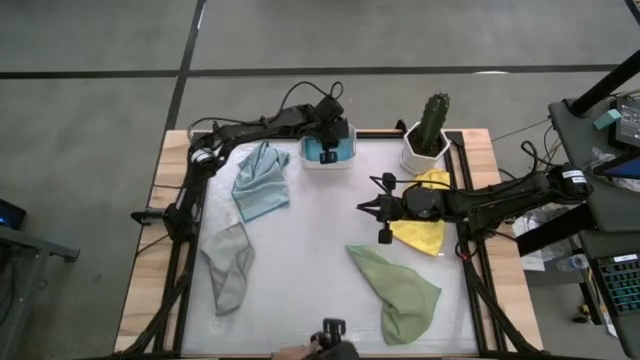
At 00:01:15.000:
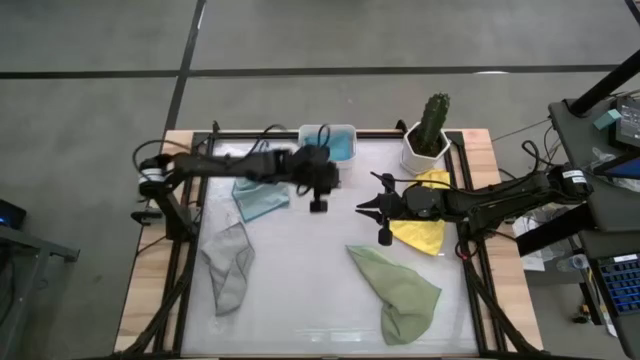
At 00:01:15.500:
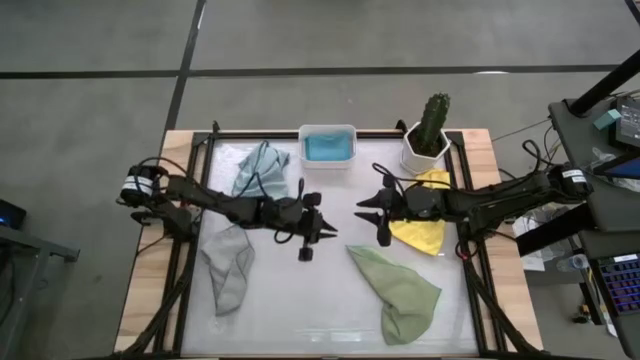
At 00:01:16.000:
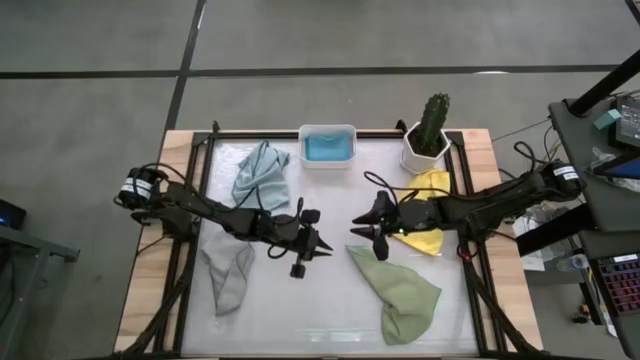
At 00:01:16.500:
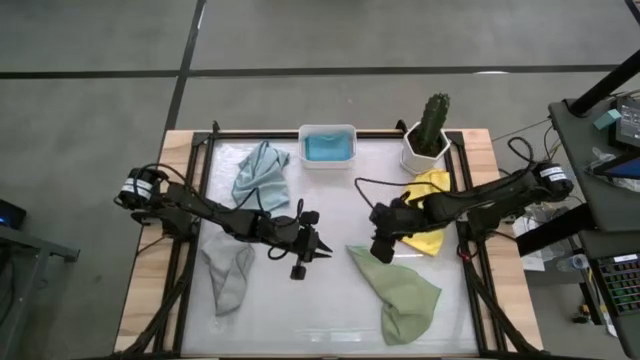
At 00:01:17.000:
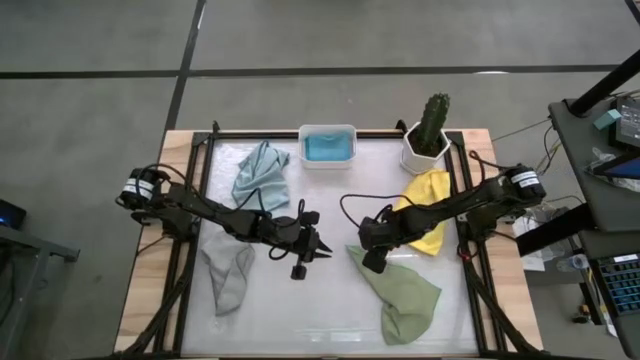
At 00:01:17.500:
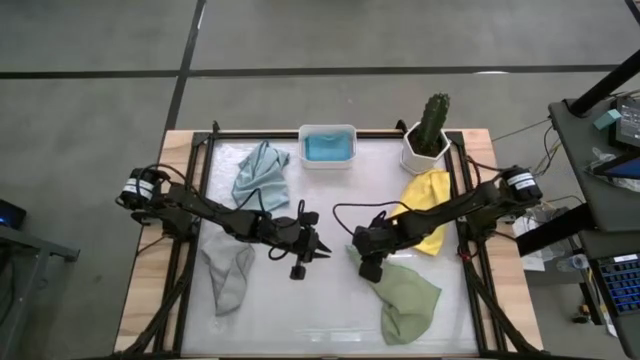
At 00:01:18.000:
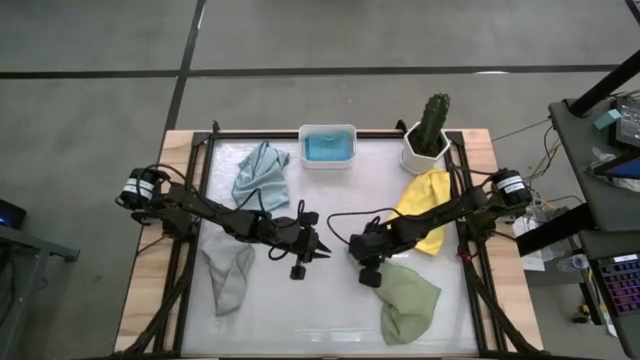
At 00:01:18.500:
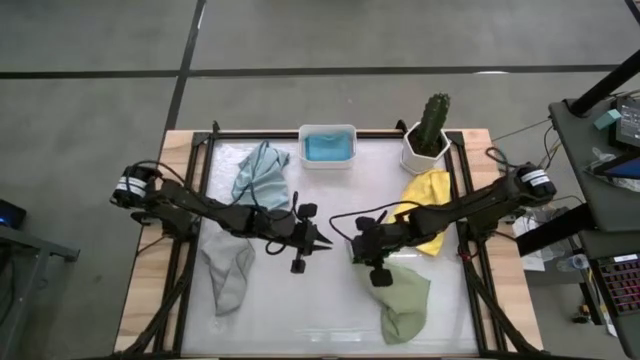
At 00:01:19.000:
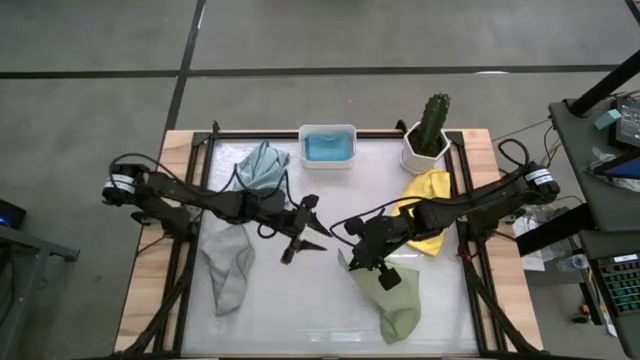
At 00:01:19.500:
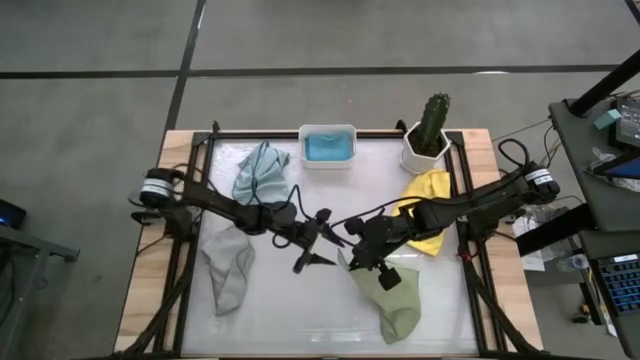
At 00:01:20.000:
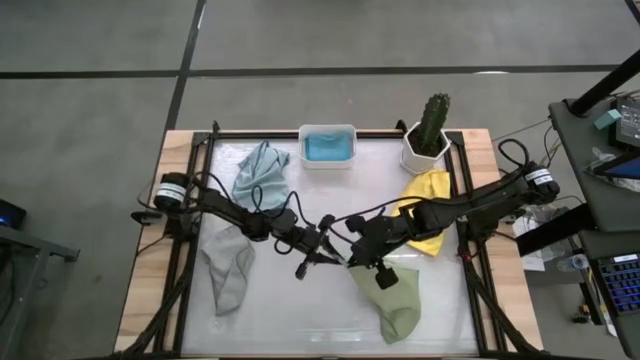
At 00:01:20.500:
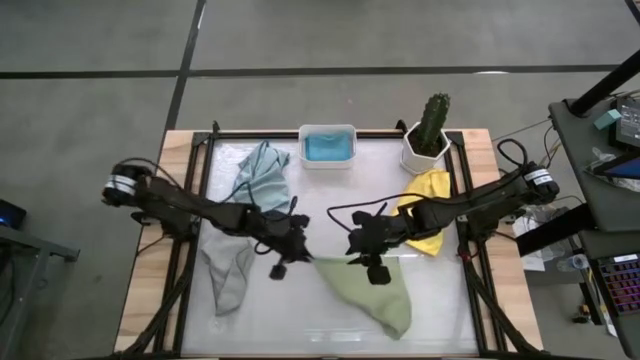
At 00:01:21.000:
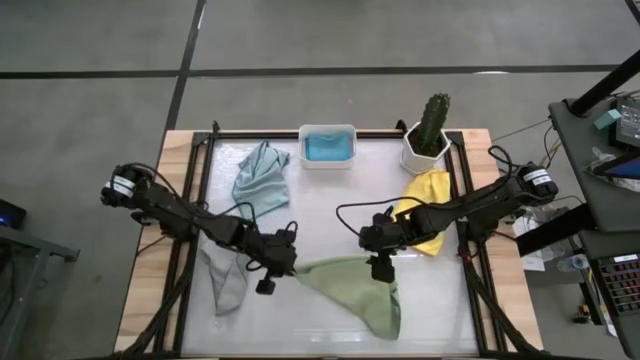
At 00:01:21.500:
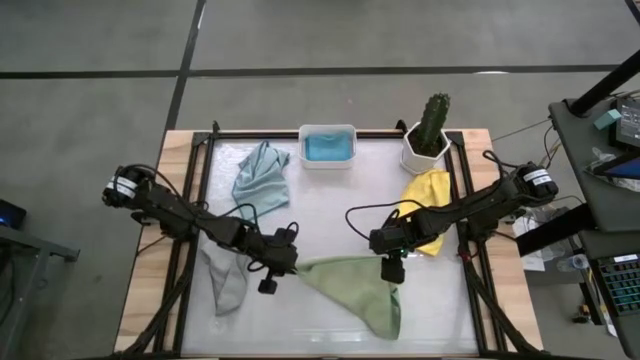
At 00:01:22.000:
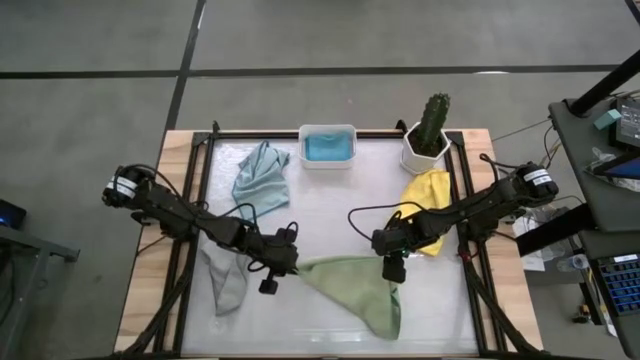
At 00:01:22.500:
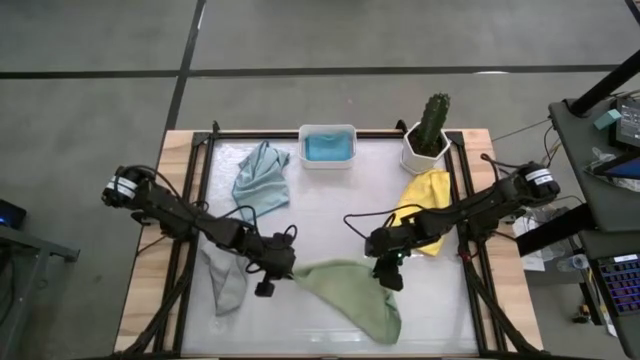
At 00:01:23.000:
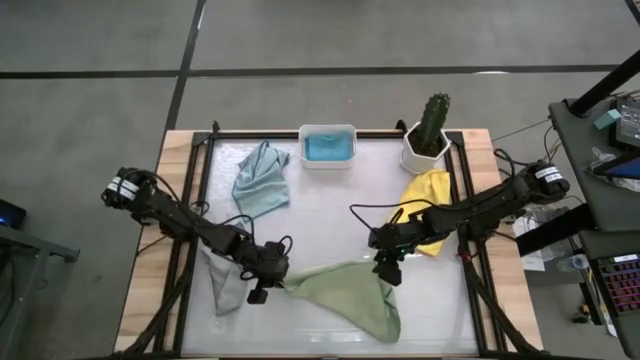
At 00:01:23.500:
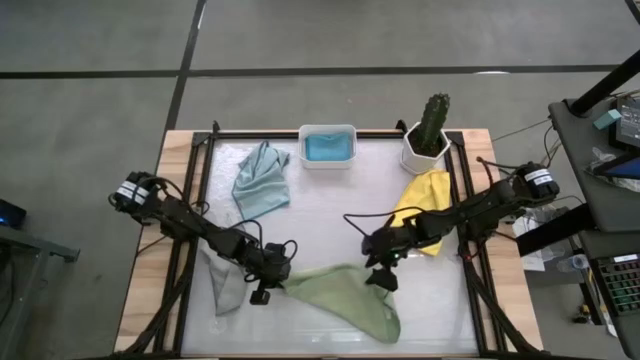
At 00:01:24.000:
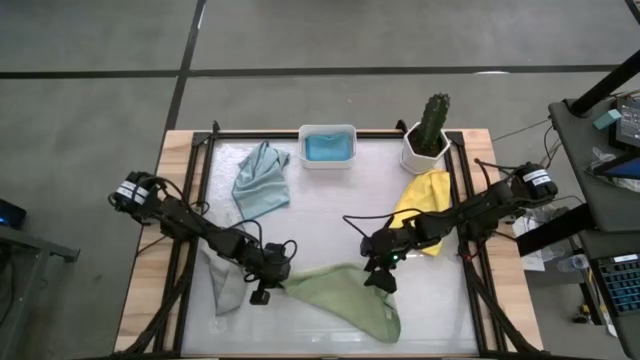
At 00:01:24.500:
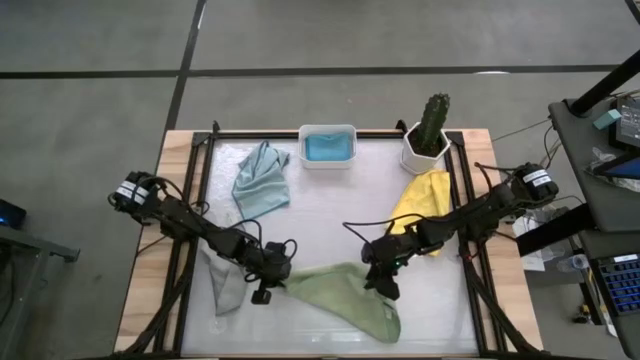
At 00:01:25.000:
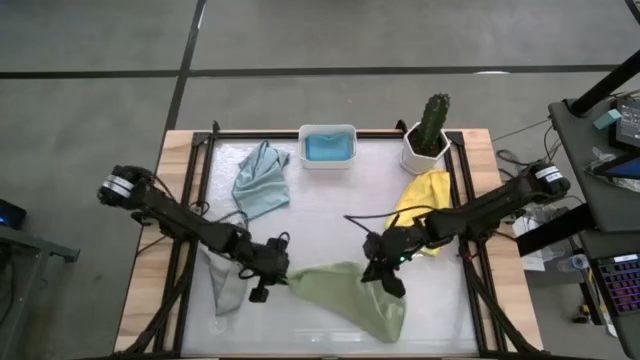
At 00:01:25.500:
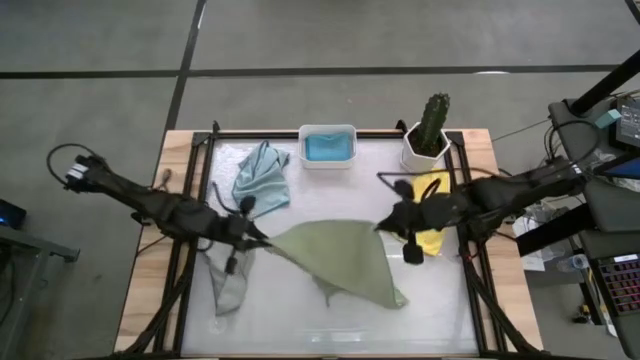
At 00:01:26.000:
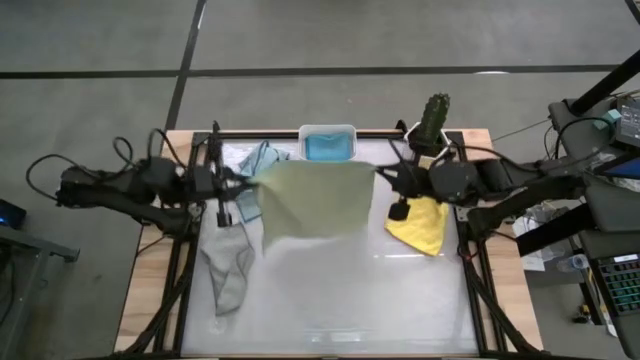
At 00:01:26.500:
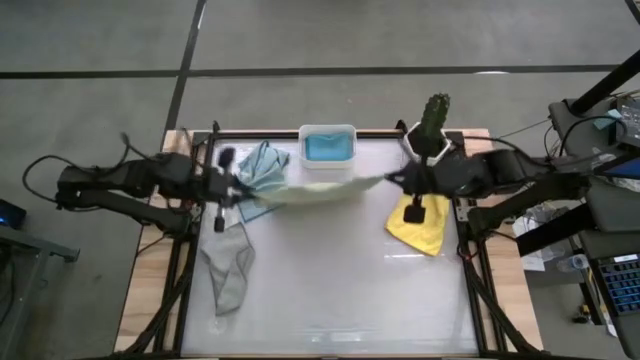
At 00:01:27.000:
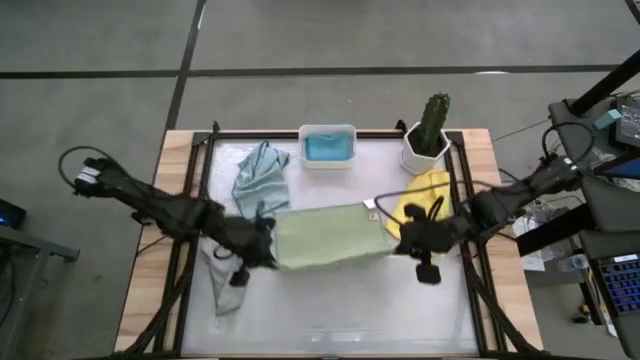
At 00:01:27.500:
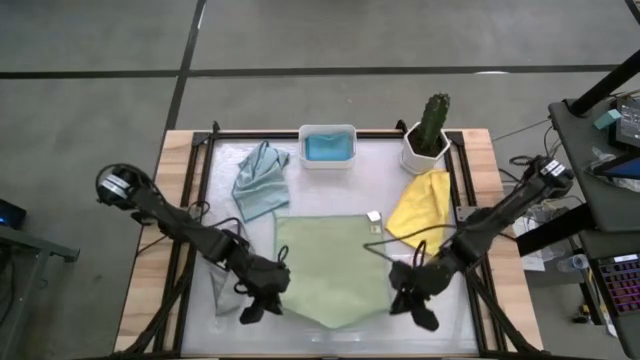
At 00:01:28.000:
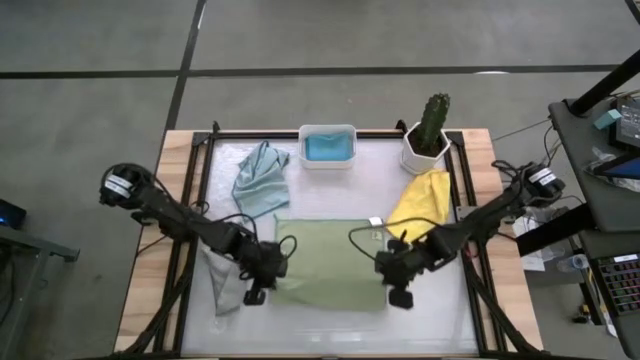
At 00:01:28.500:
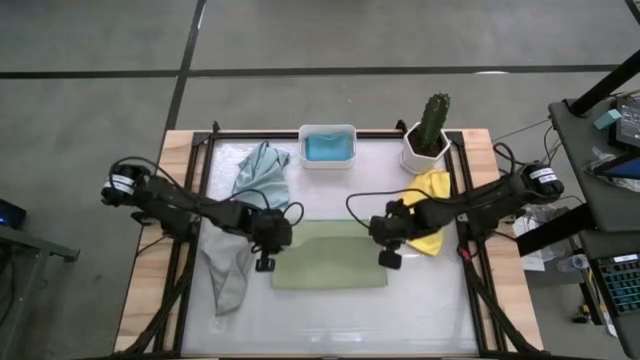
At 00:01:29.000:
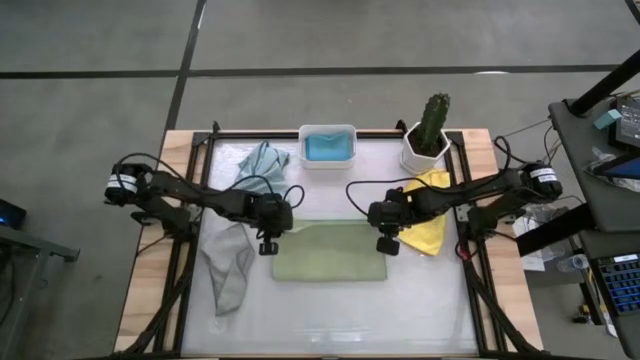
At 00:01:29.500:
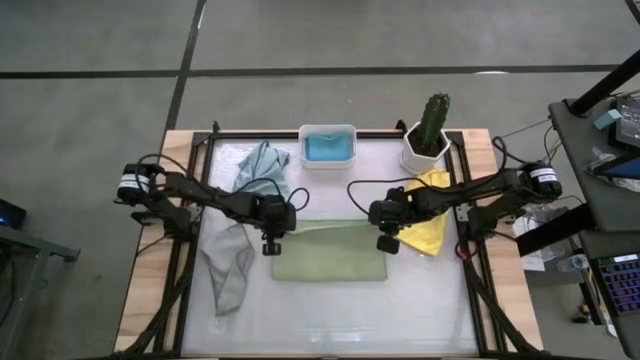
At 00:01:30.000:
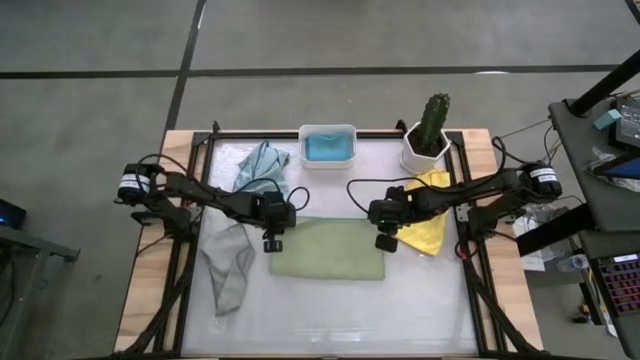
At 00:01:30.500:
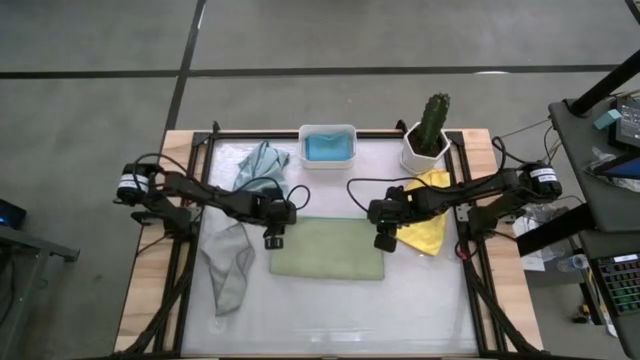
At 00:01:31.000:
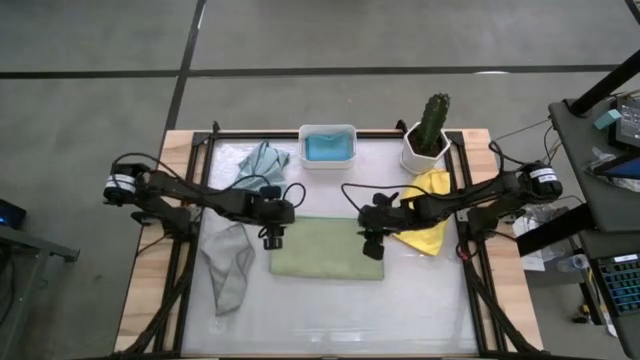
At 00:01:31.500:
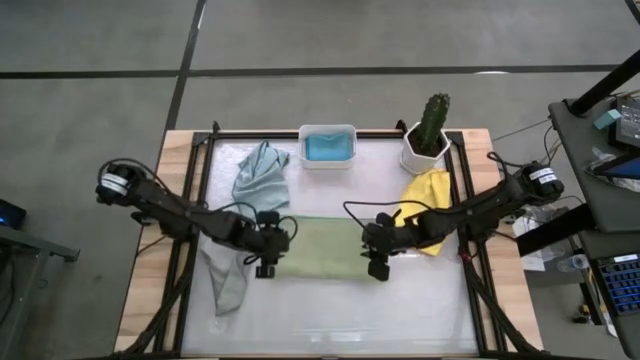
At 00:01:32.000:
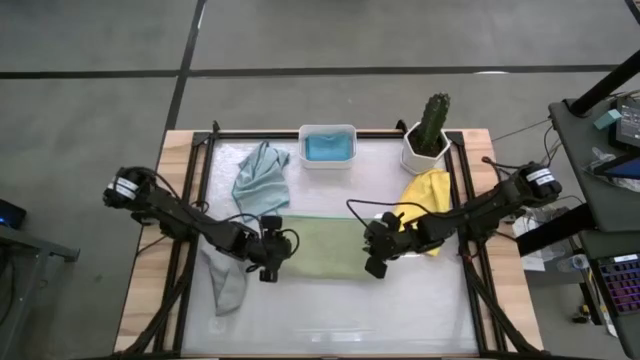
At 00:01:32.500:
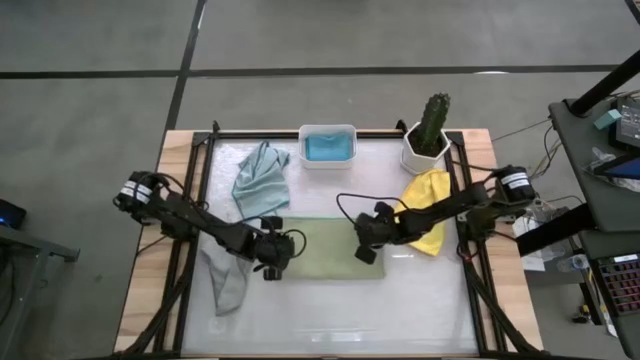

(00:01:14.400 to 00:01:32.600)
Task: Fold microfiber towels
Fold the green cloth
